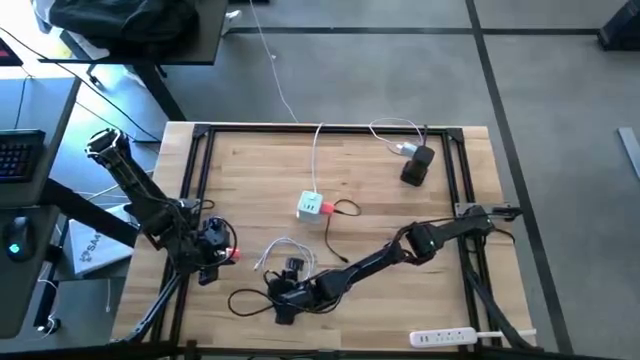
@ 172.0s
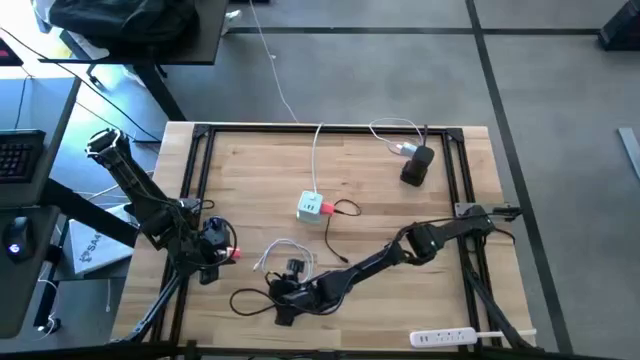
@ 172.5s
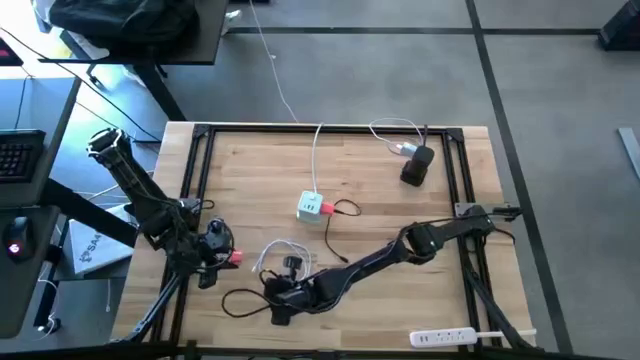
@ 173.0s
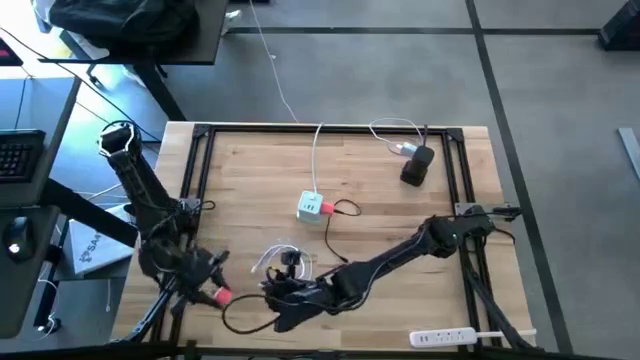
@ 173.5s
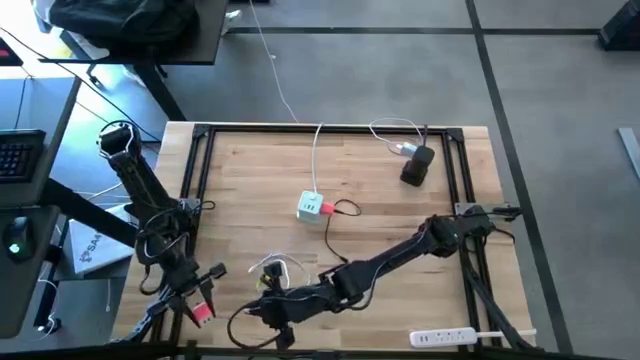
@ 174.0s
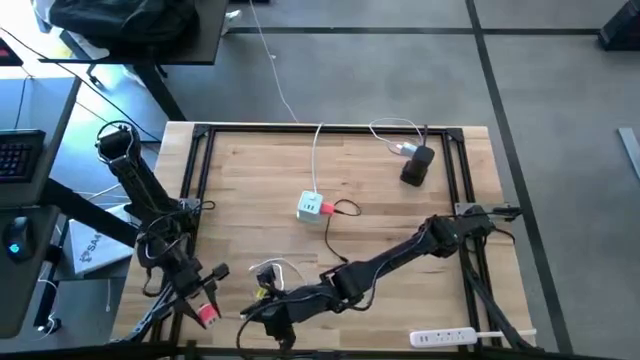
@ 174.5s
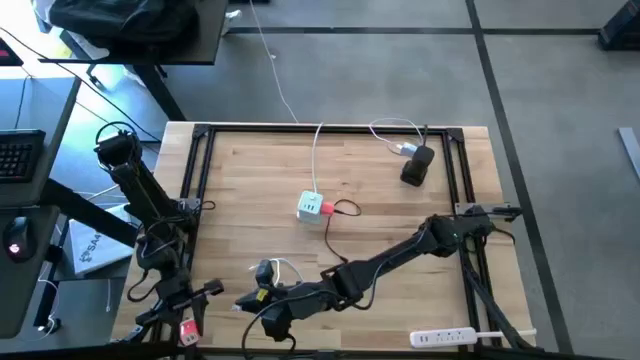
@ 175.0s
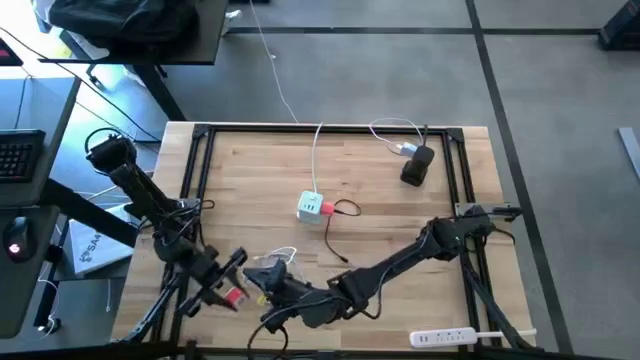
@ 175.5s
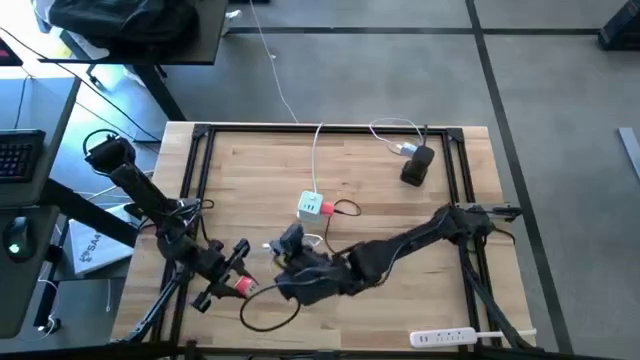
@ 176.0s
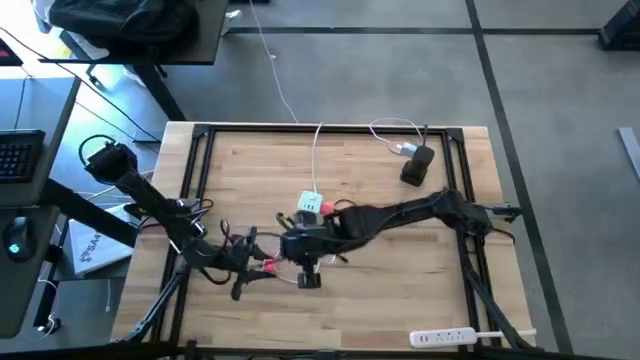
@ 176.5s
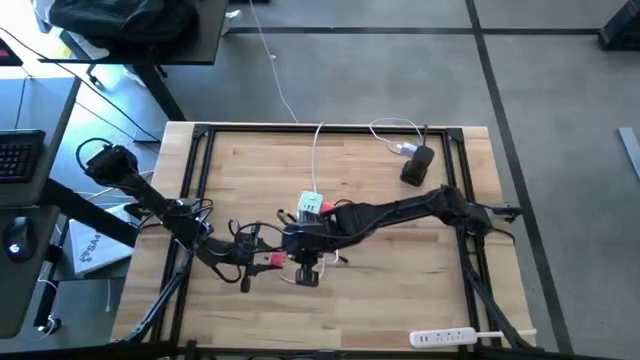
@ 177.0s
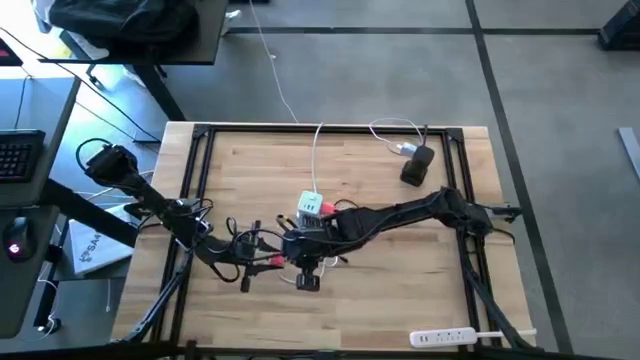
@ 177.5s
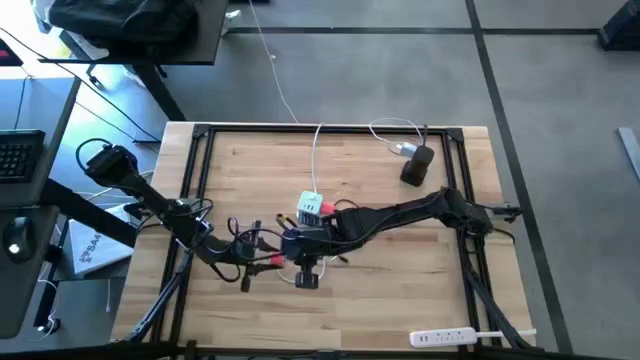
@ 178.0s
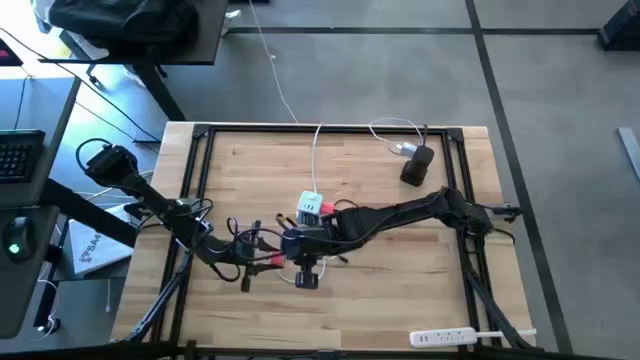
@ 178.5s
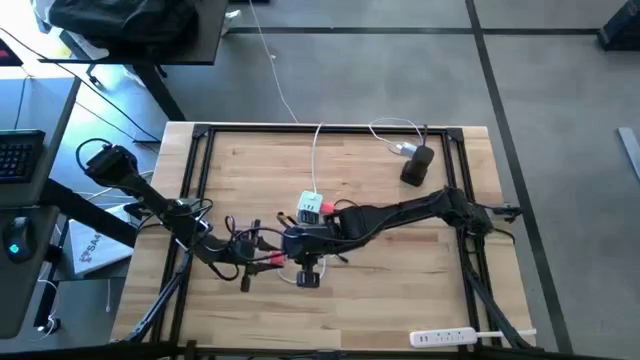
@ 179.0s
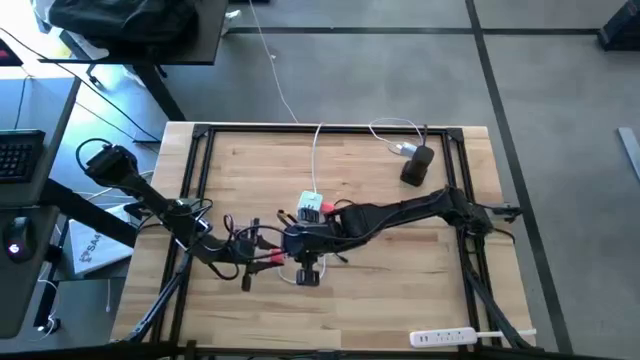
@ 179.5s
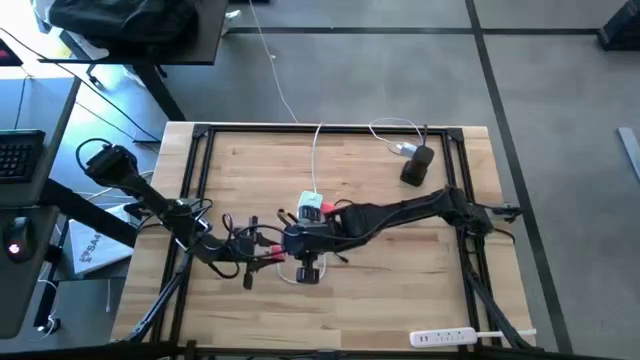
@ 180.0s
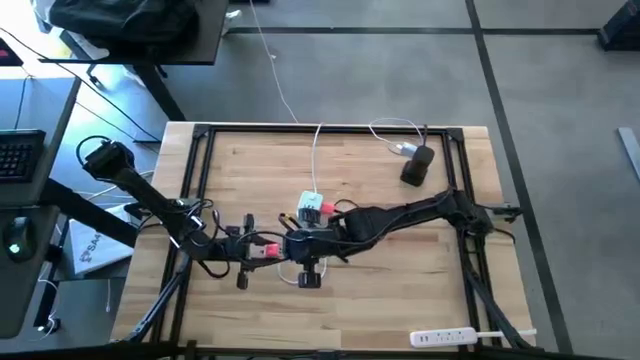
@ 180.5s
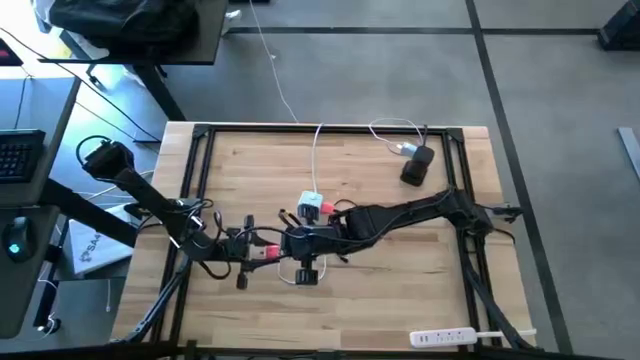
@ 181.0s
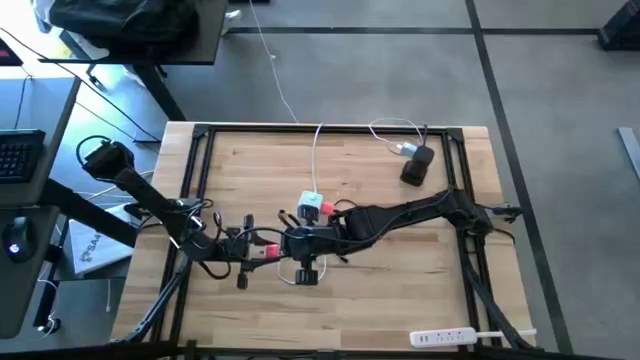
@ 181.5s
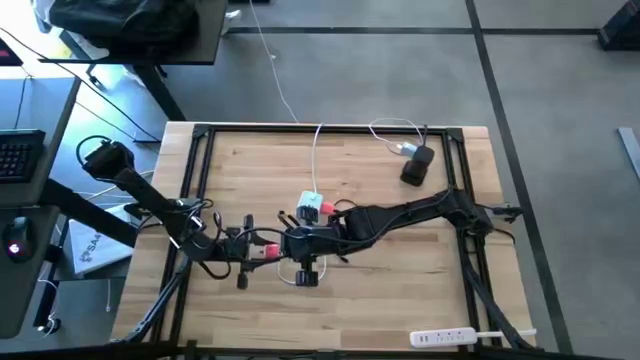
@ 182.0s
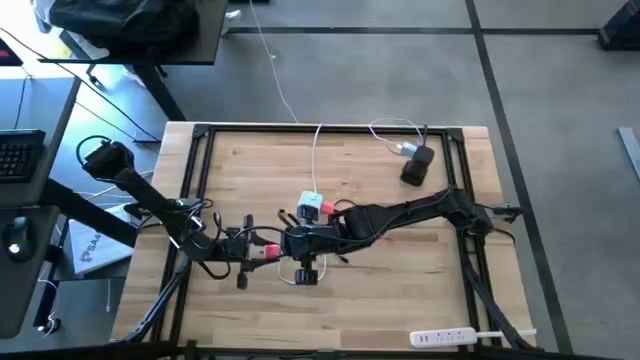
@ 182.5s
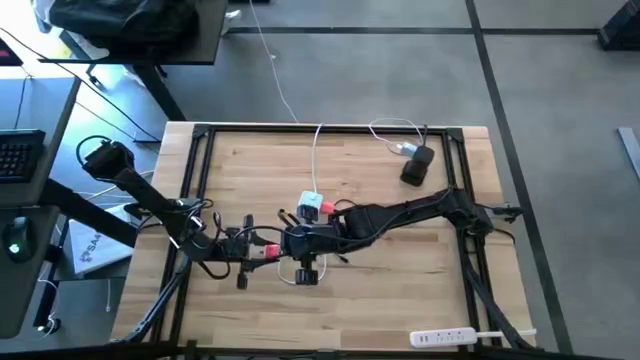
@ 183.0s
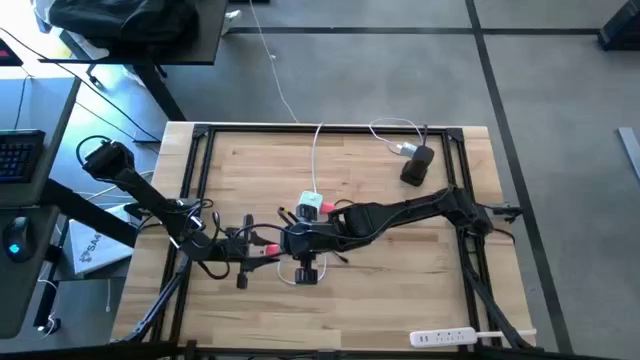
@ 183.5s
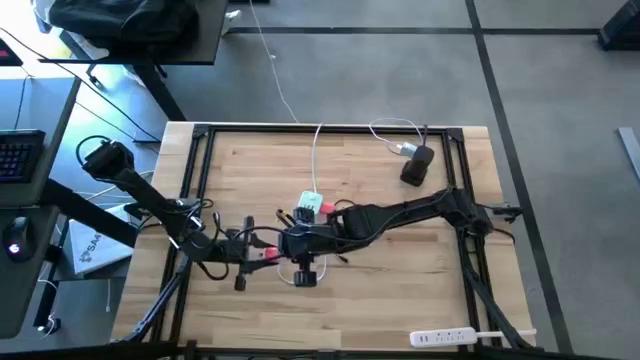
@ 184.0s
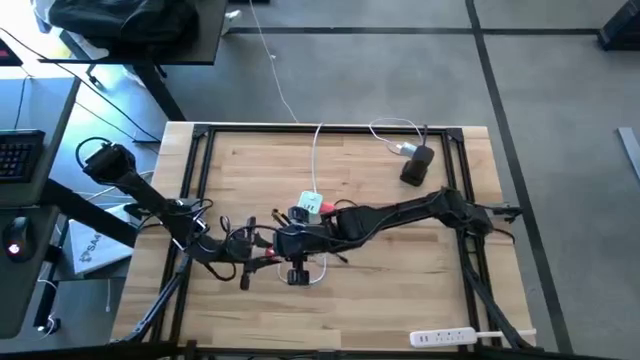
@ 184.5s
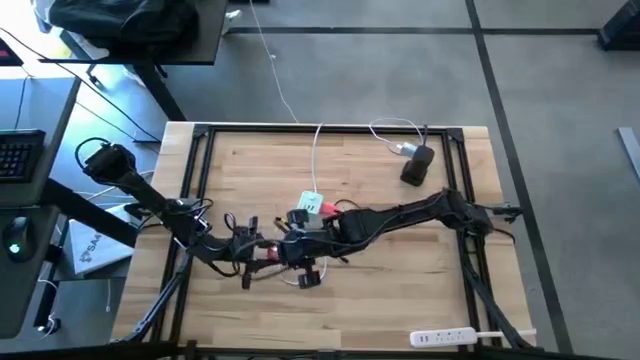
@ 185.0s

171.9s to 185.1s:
Task: Insert USB
Insert the white charger cable into the pink charger adapter

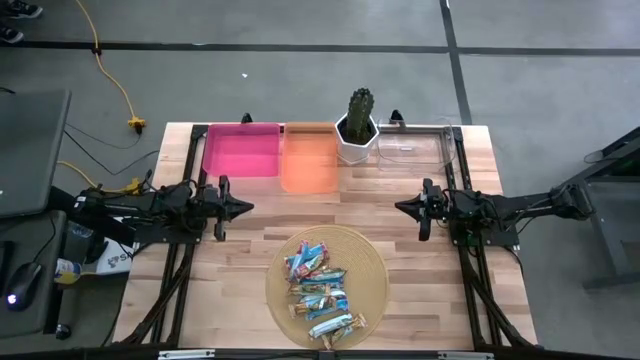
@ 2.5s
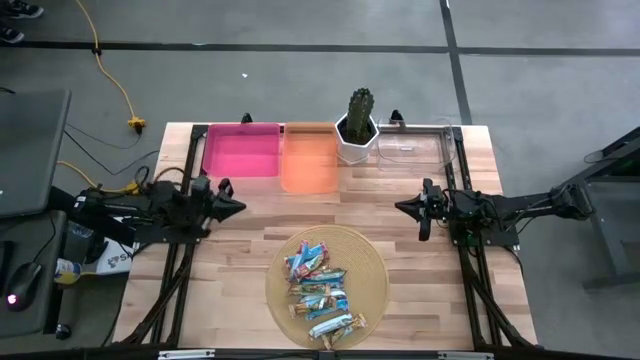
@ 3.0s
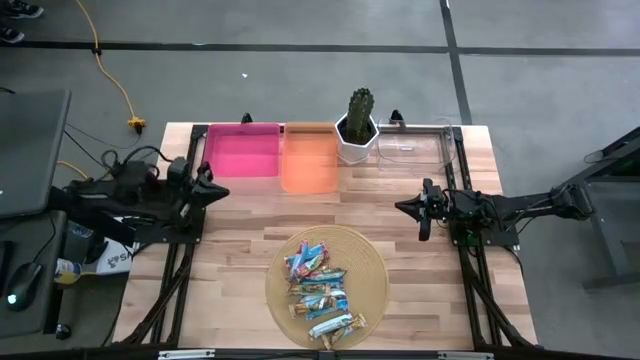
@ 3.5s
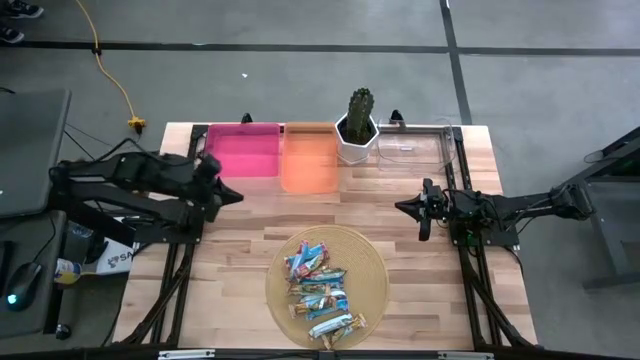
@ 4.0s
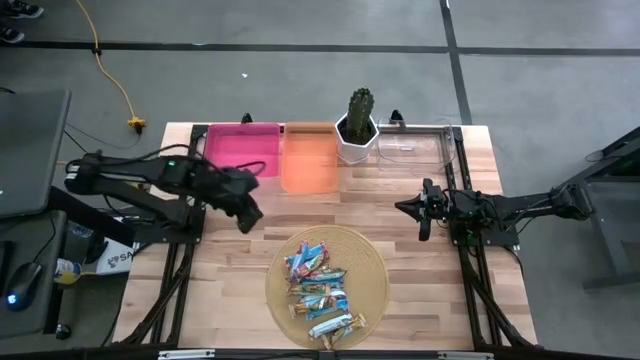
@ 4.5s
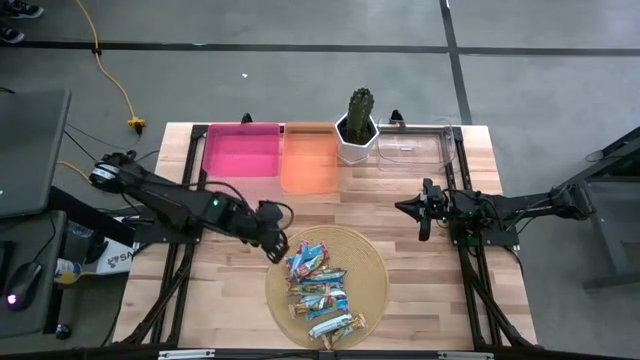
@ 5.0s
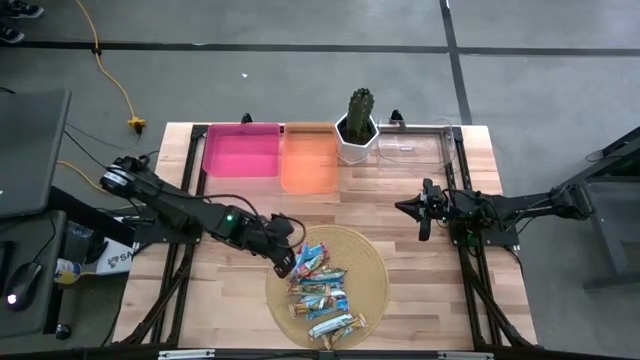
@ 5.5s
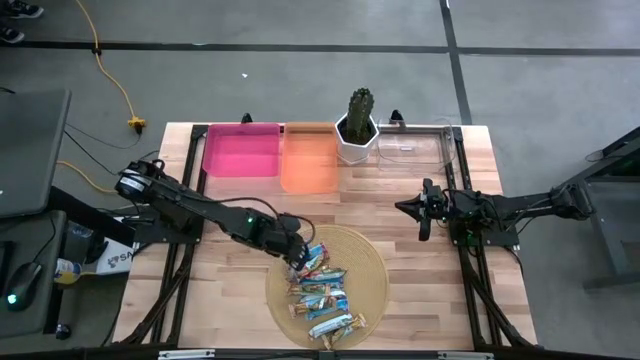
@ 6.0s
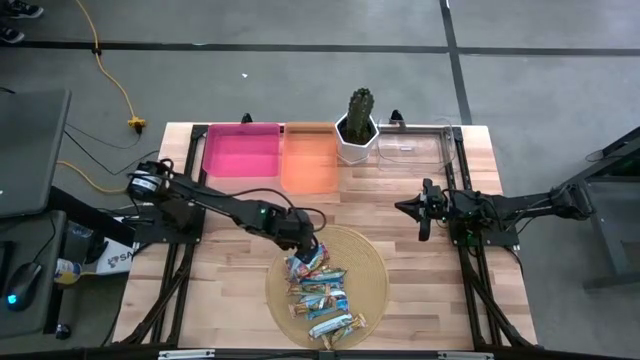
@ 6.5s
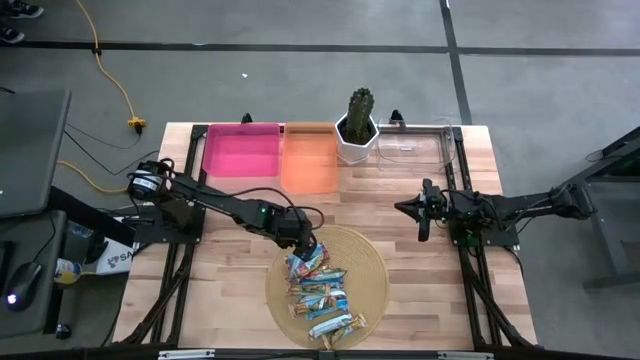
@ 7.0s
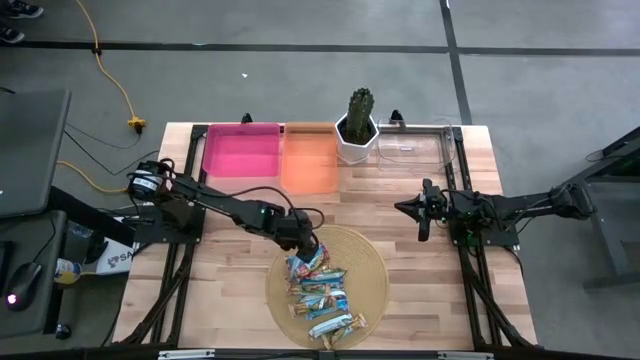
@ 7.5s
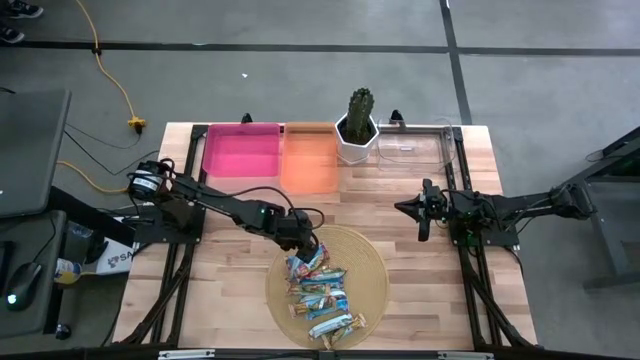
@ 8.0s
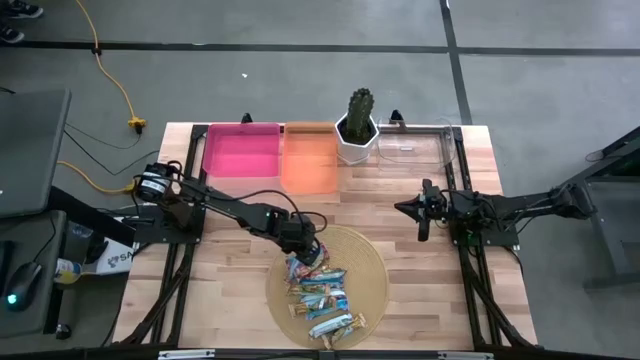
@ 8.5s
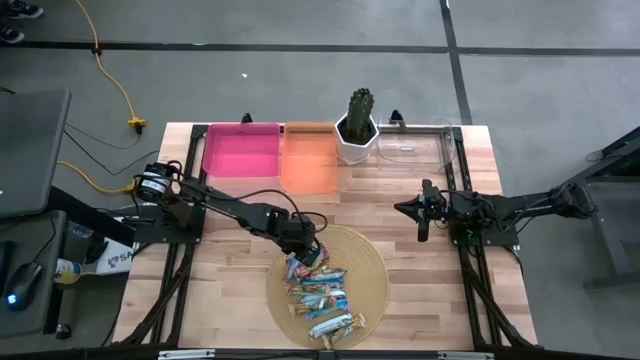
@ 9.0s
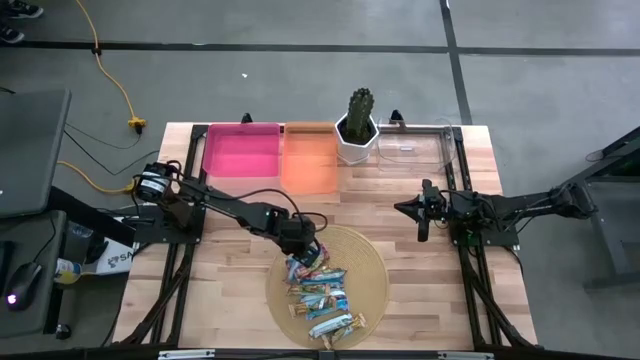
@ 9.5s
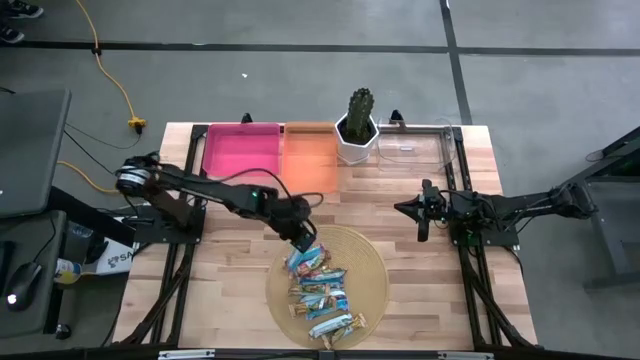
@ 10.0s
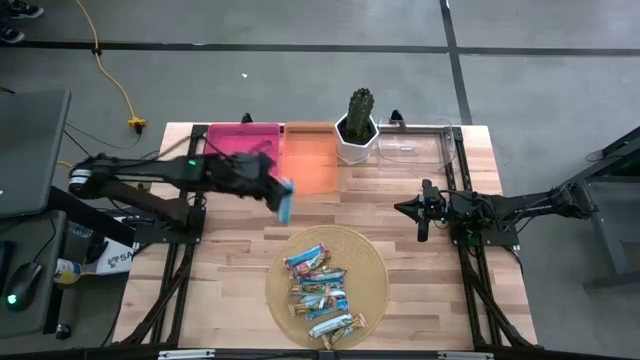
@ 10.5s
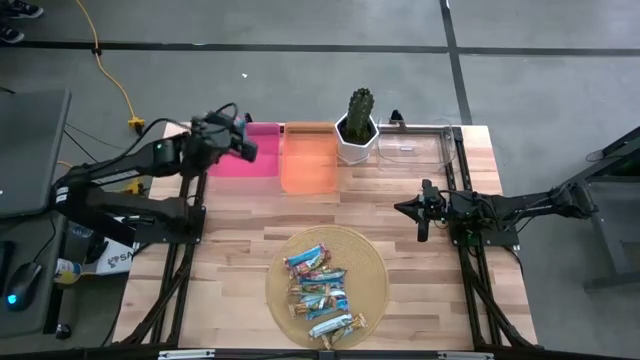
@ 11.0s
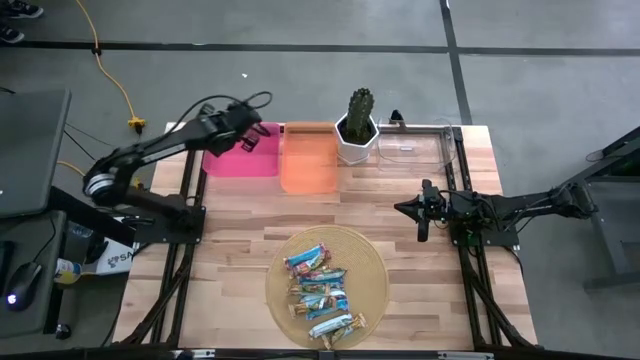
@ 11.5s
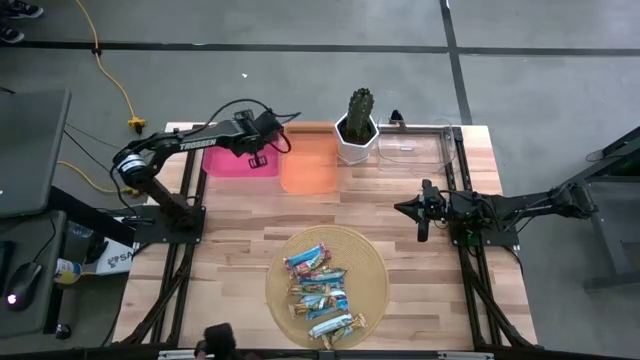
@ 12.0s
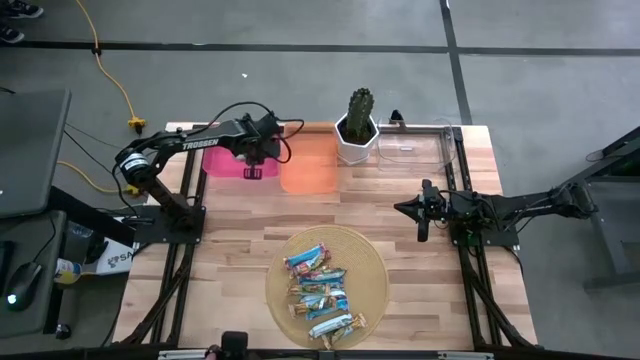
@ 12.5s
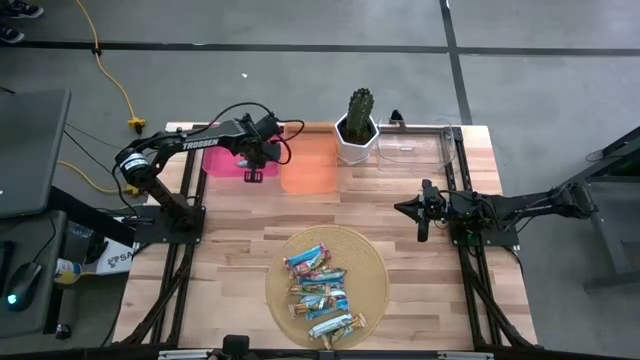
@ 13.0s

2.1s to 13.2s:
Task: Pick and place Granola Bars by type
Put the red granola bar into the pink bin
